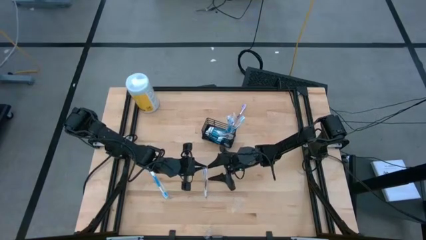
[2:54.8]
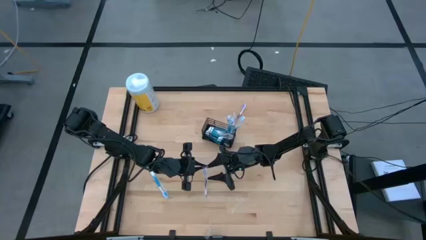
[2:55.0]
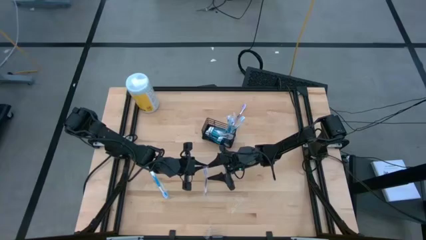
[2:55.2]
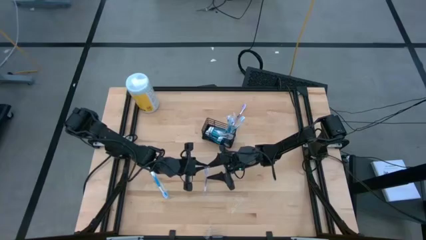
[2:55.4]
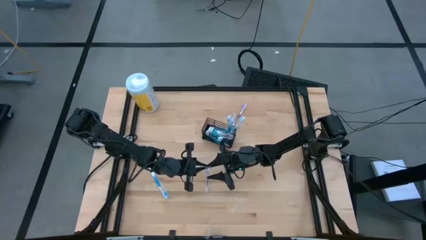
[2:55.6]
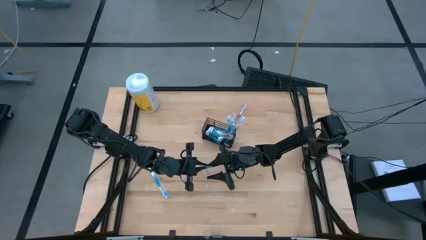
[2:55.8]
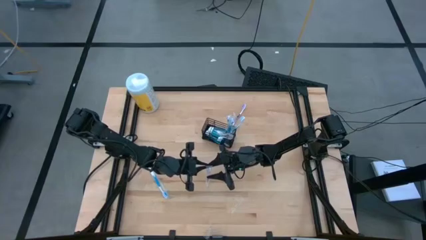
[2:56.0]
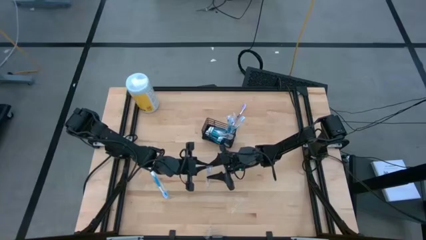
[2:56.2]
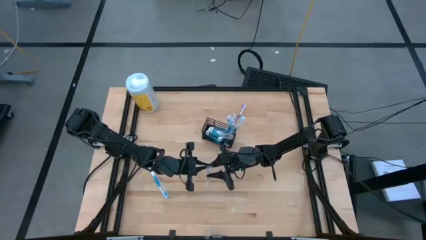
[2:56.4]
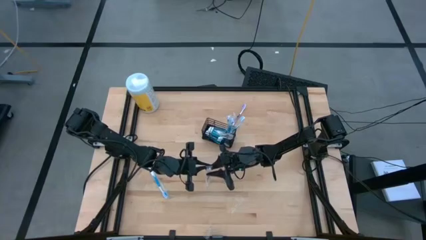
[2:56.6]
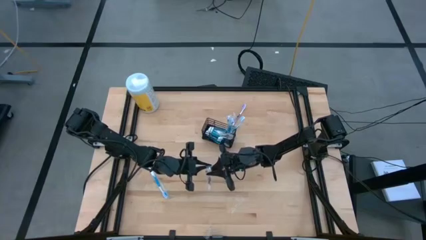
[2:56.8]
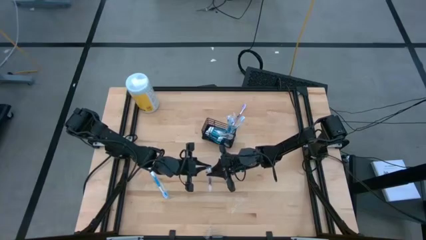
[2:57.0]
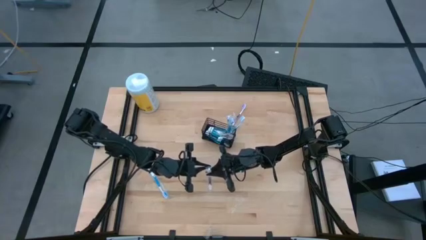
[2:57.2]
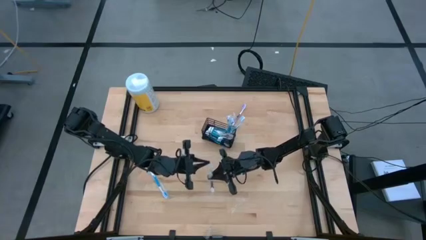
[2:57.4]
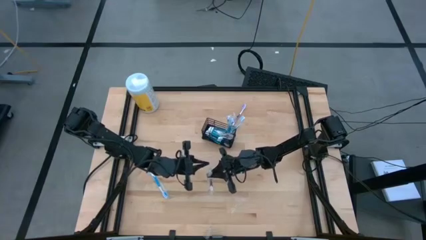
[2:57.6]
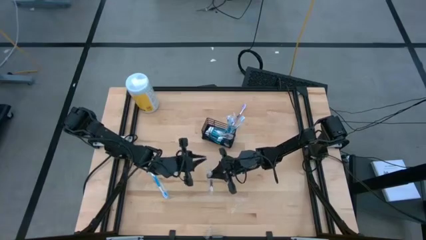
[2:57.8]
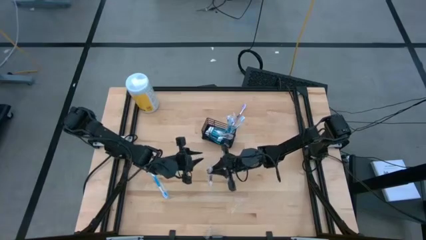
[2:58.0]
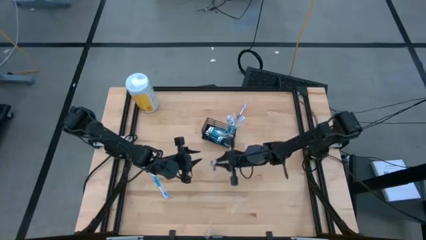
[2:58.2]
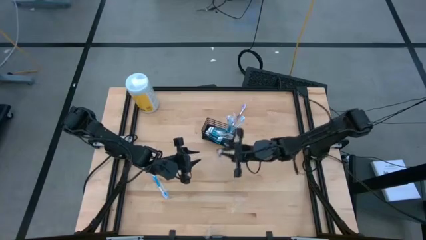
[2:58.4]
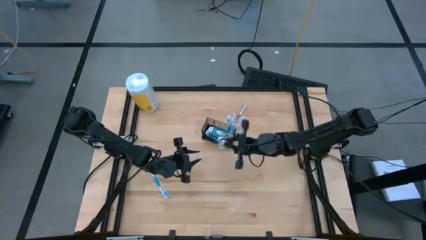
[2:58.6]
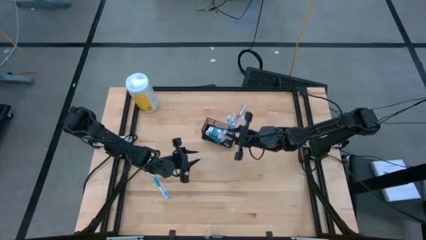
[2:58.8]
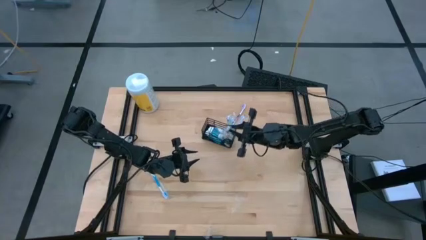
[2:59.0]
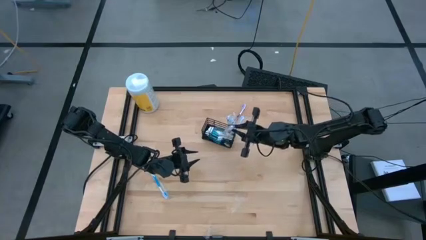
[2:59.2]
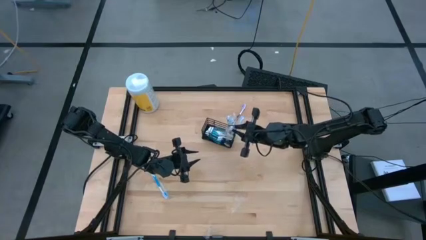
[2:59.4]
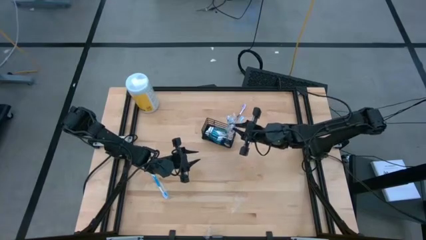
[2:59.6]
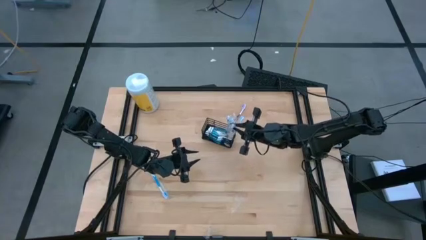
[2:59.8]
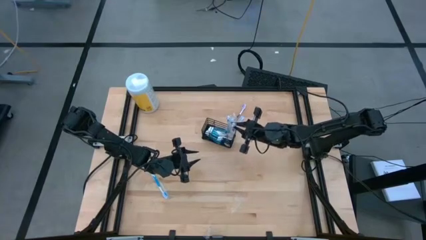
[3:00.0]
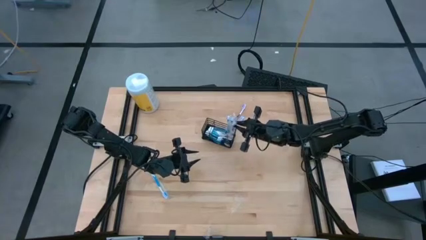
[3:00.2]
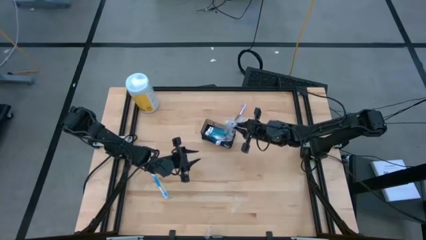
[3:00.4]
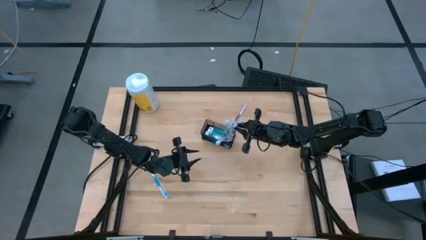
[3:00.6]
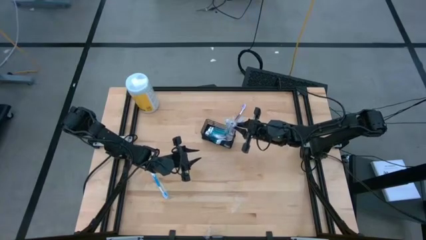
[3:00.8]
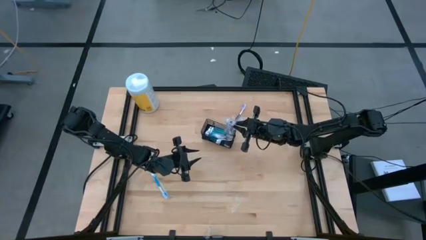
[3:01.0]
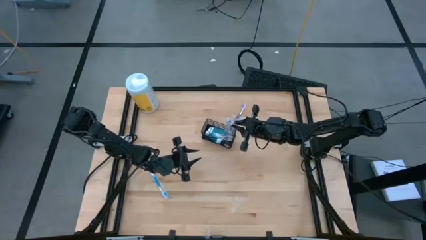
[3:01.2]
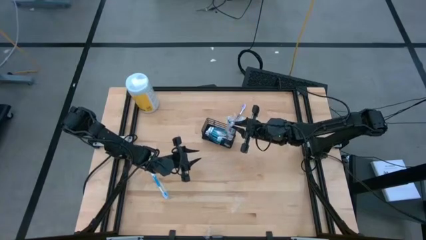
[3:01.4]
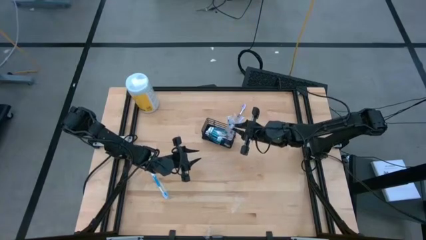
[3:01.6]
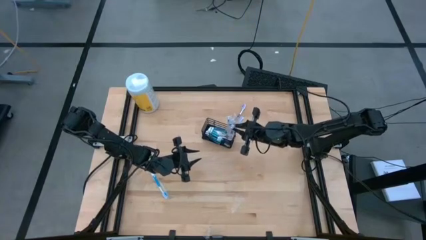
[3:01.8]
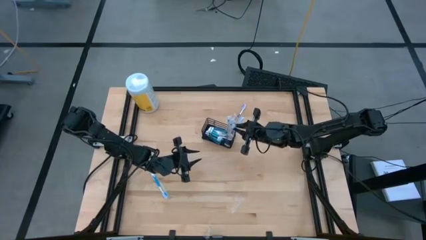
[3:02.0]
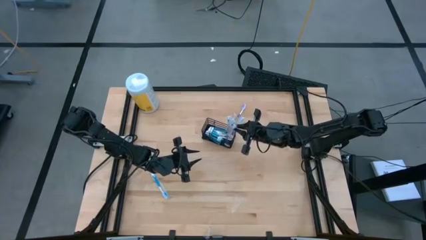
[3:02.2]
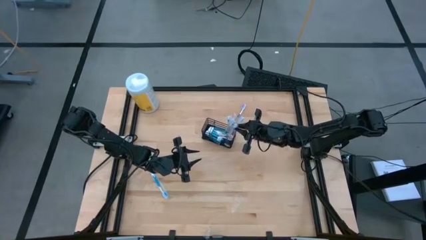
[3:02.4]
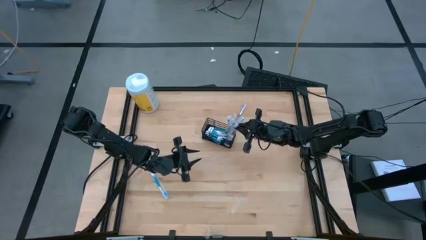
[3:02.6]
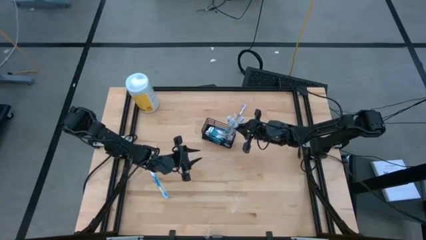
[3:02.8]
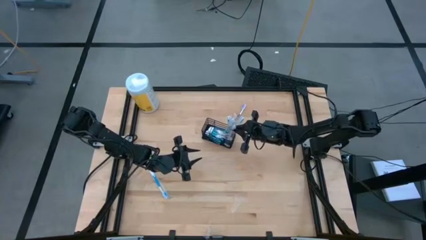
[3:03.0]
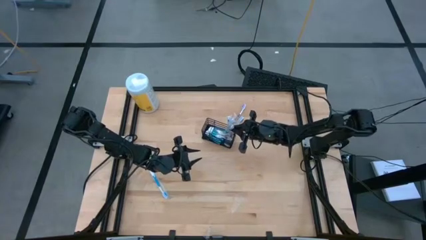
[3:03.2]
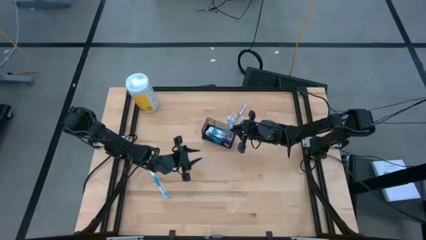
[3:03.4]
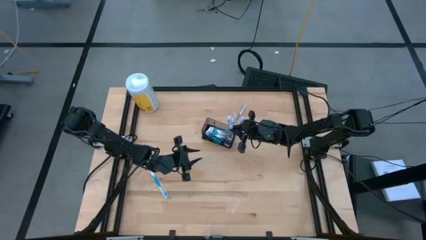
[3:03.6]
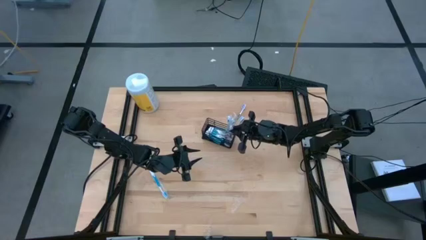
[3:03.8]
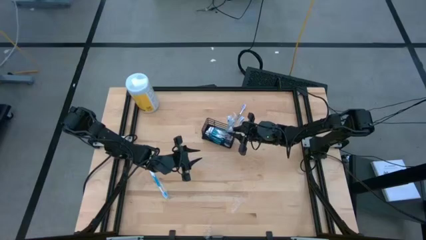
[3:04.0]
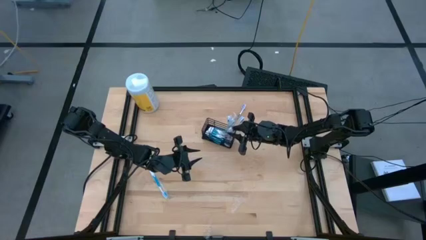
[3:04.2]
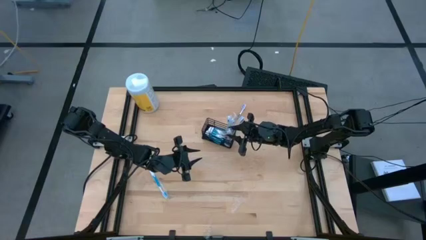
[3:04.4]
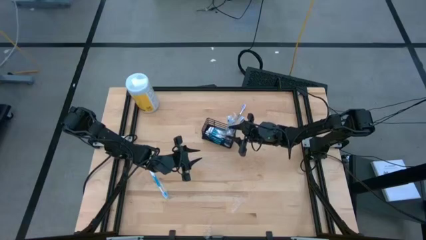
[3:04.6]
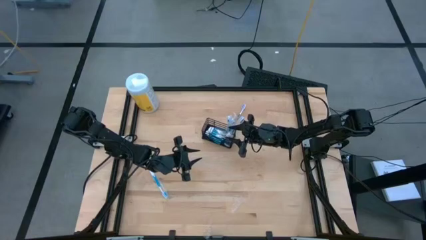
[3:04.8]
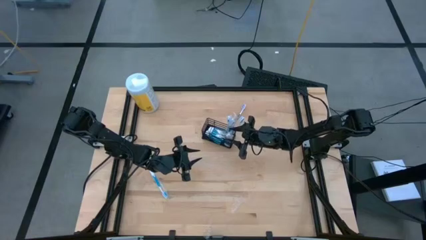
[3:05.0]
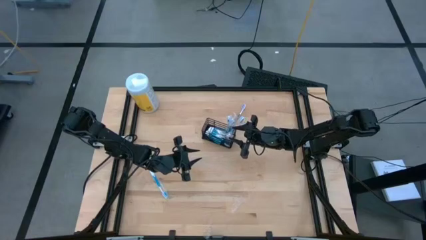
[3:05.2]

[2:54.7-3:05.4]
Task: Pick & Place toothbrushing station
Put the purple toothbrush into the wire organizer

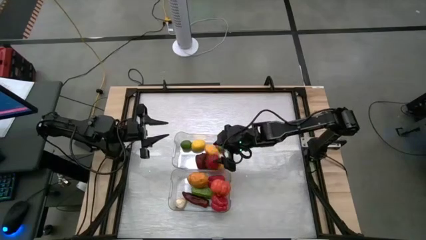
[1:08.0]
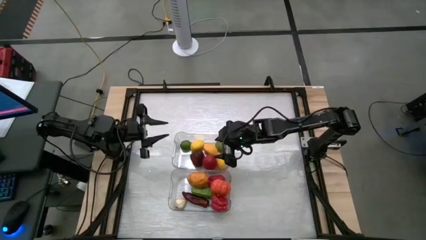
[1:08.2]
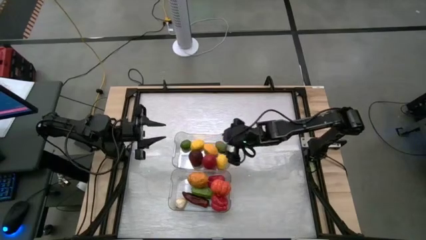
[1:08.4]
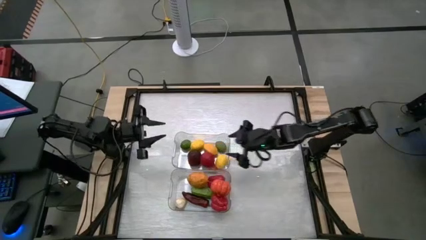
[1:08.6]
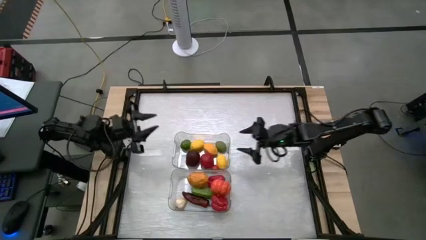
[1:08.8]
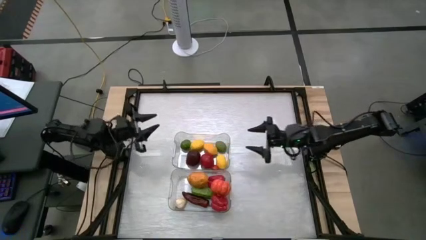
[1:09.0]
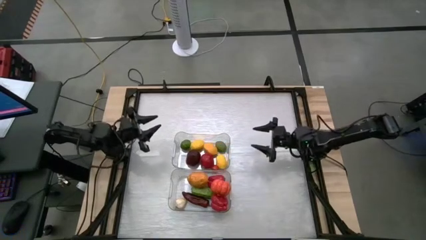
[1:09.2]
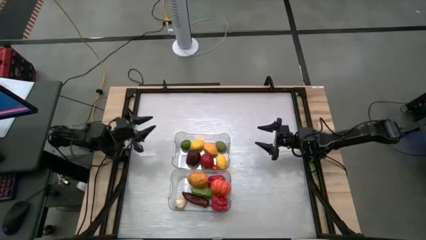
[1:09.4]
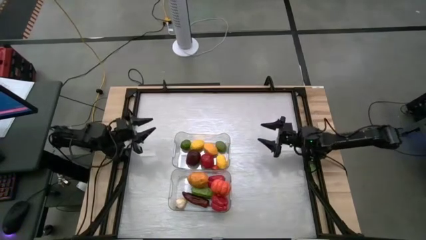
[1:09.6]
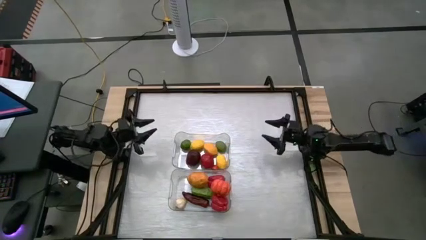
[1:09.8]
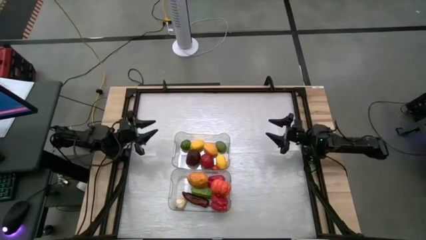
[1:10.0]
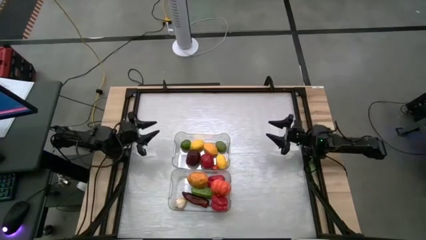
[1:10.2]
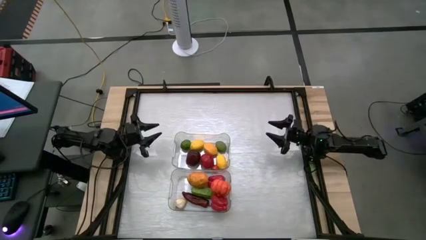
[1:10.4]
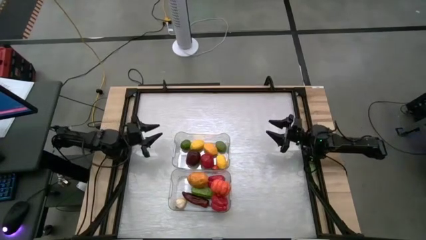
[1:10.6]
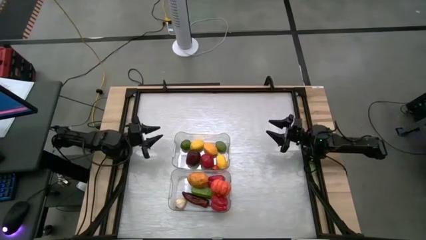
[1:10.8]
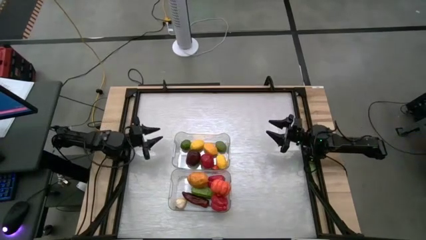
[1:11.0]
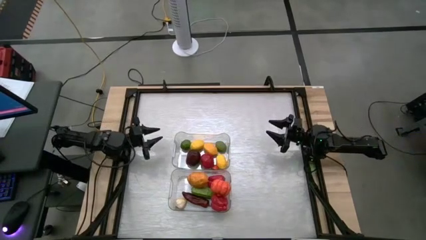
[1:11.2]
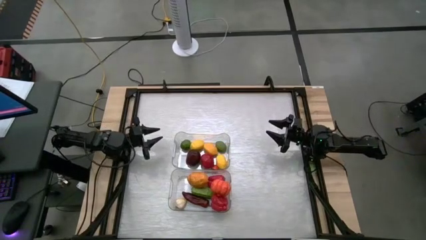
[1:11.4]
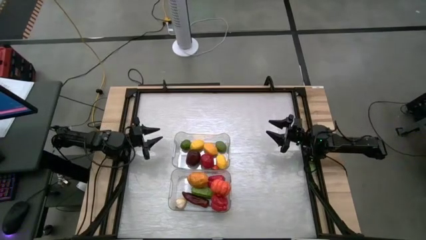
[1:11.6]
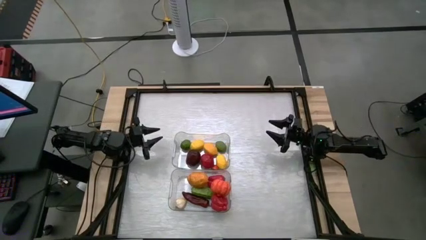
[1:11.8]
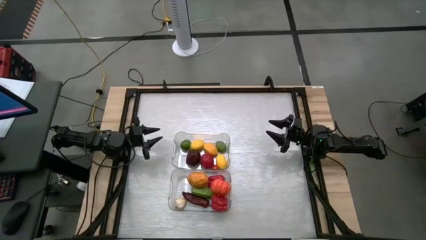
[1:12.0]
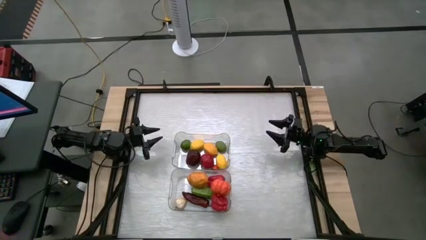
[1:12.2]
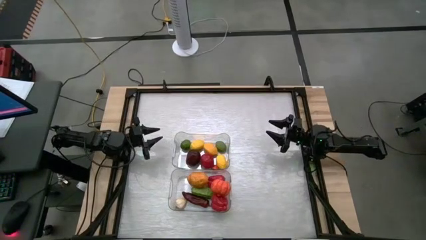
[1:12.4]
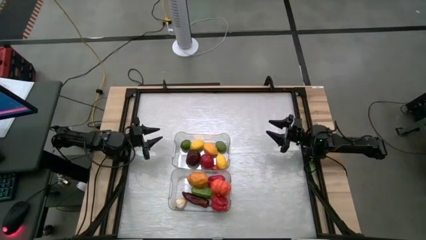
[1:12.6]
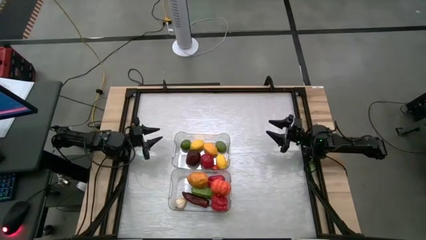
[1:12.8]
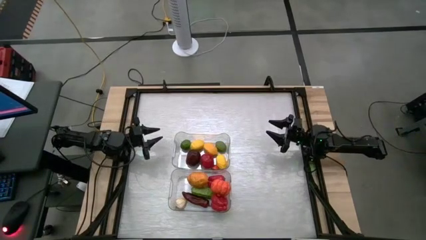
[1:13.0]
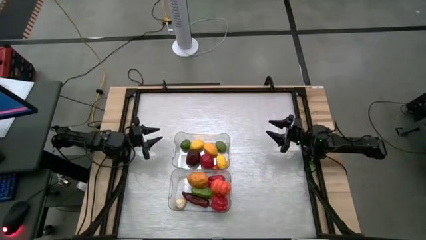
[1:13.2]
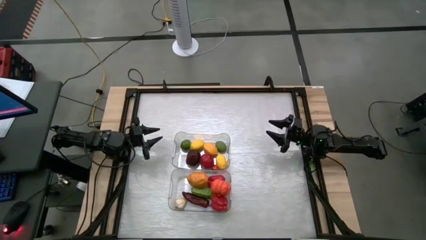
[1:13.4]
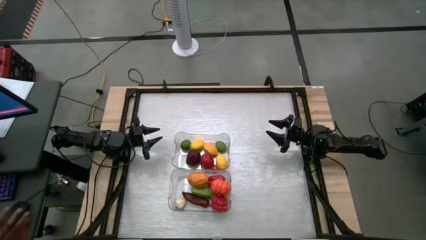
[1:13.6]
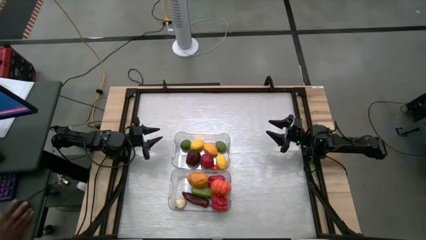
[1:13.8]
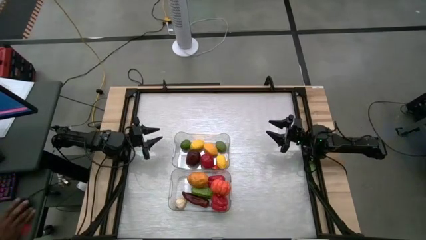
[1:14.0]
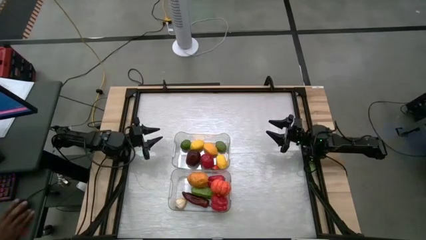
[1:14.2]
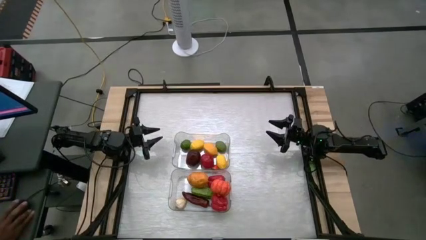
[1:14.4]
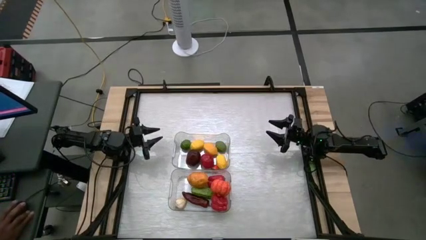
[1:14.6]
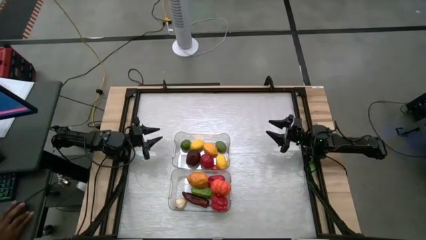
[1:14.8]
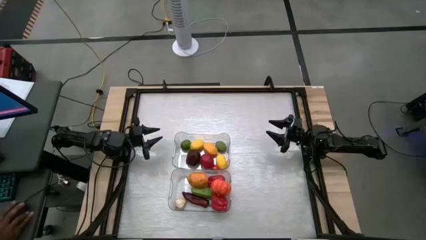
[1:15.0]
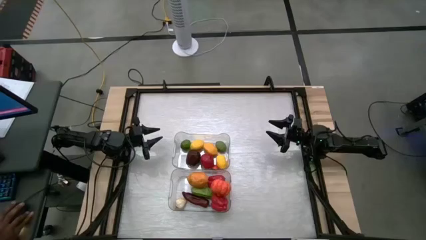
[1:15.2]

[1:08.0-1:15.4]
Task: Sort produce into baskets
Return to Home Position
